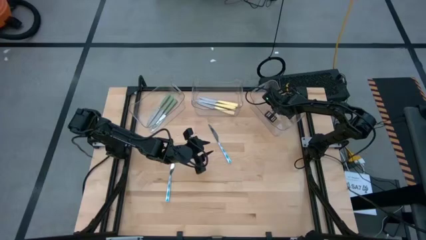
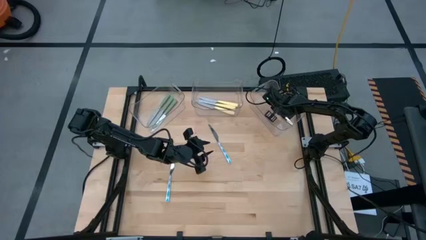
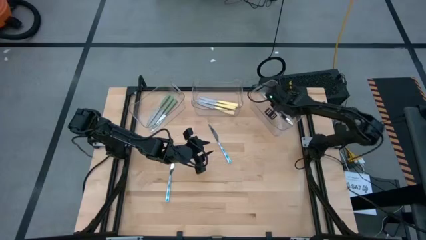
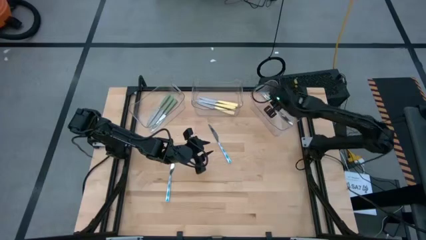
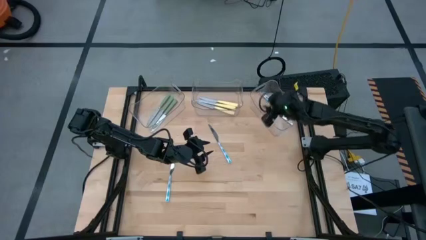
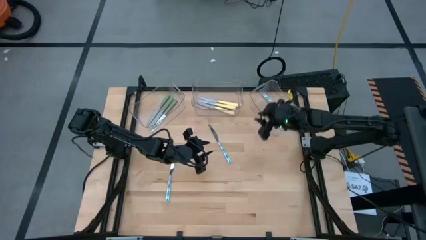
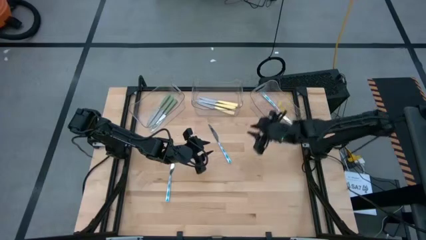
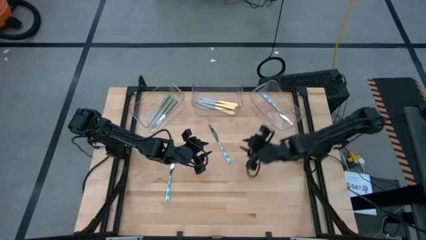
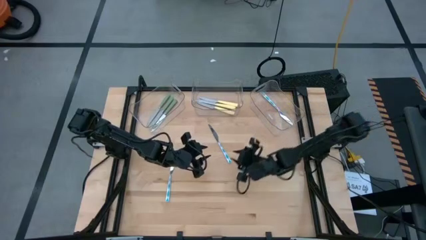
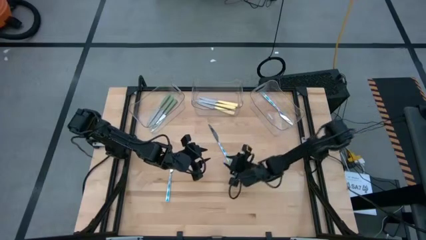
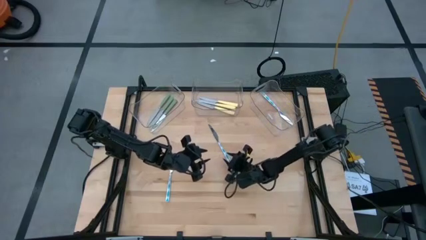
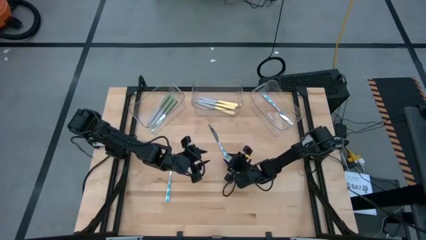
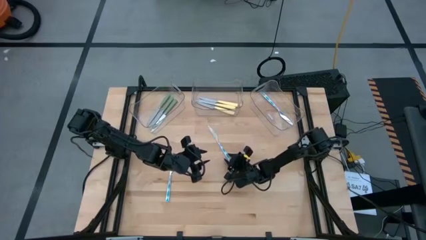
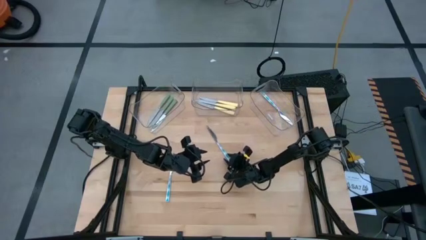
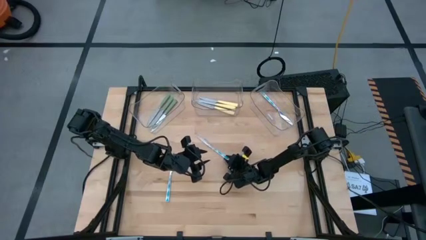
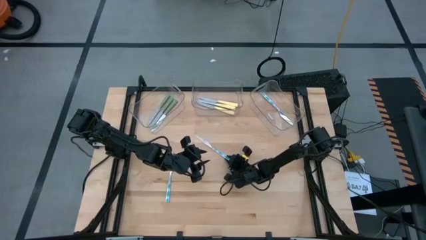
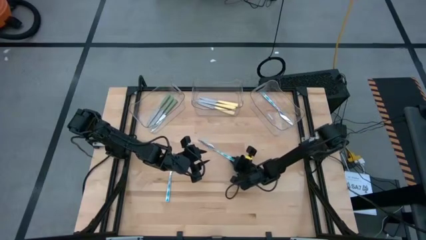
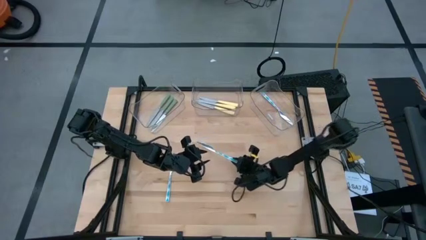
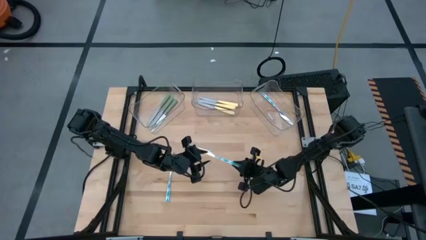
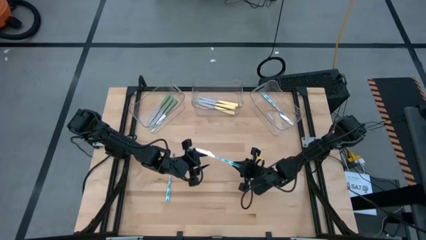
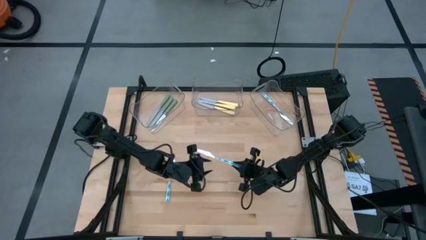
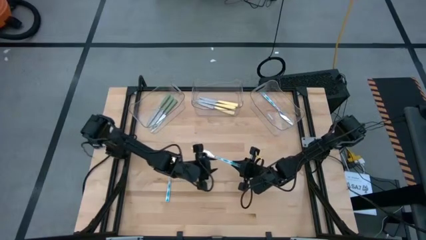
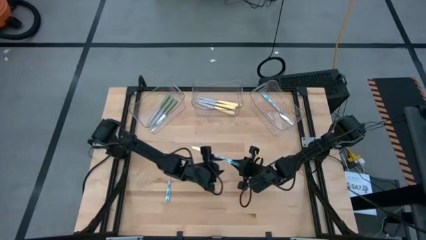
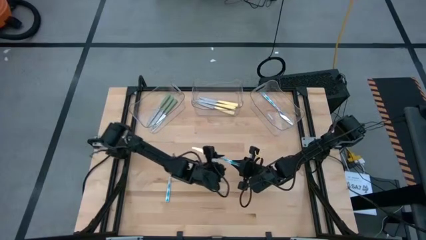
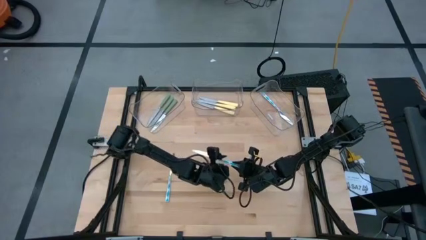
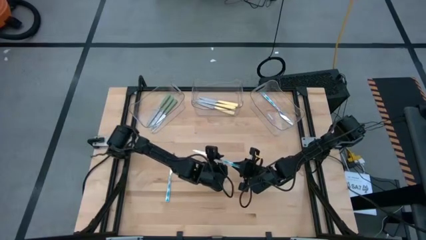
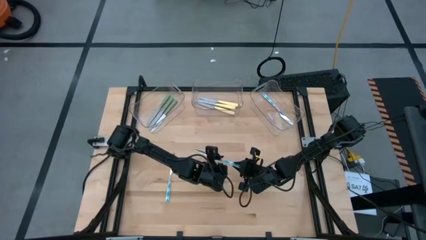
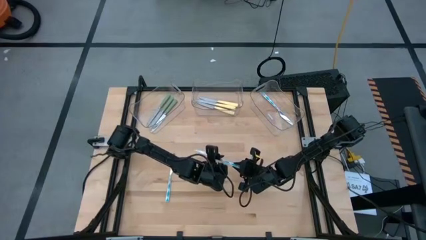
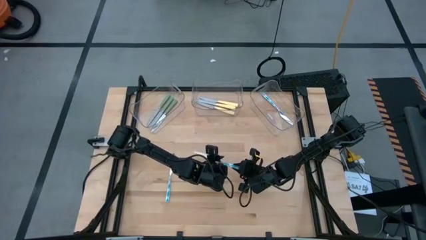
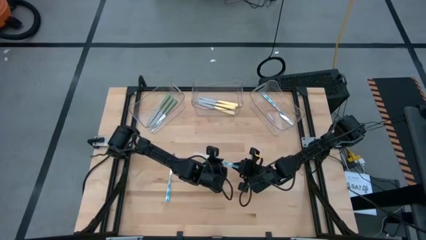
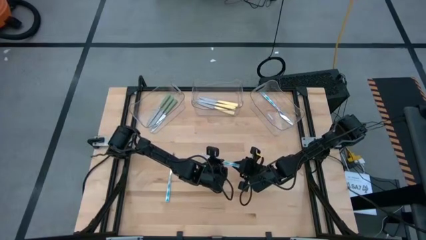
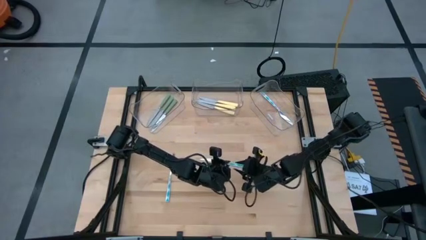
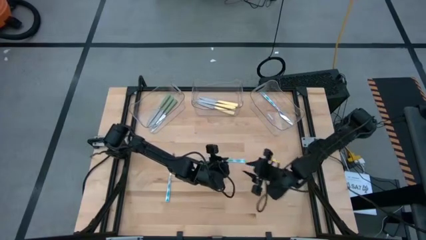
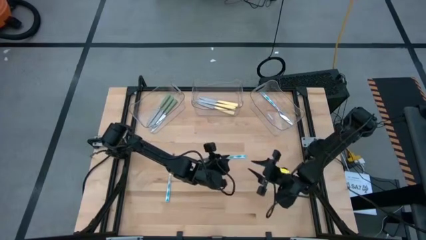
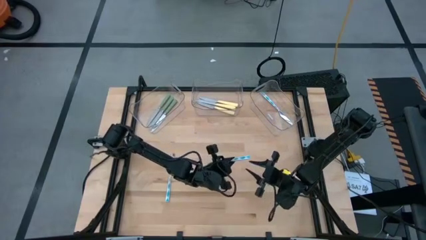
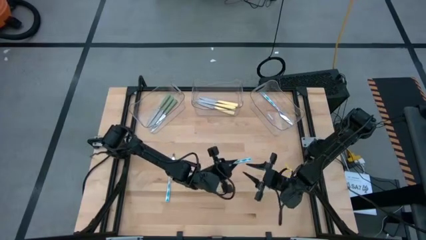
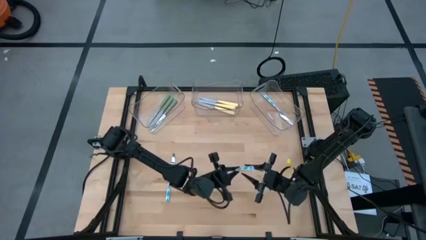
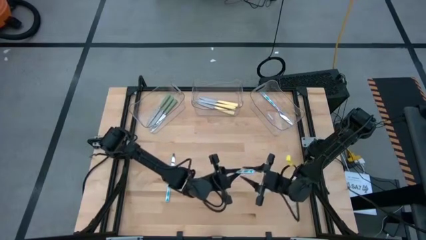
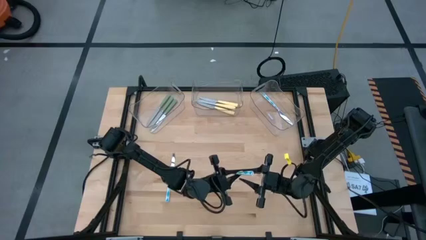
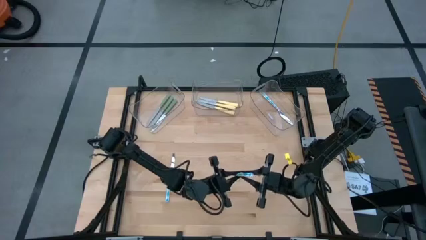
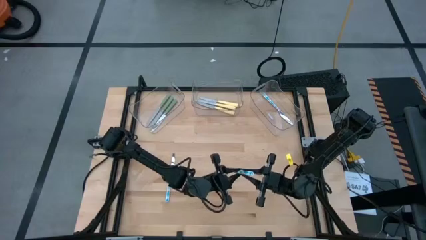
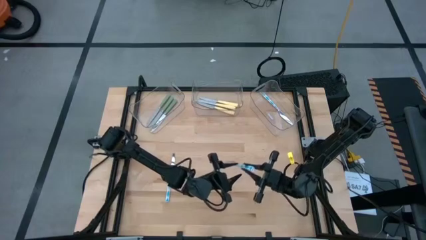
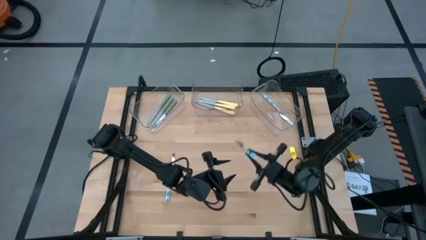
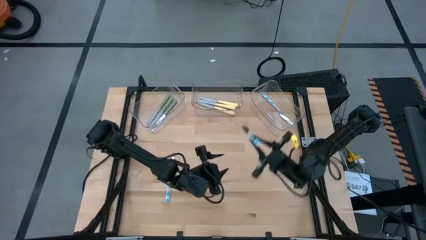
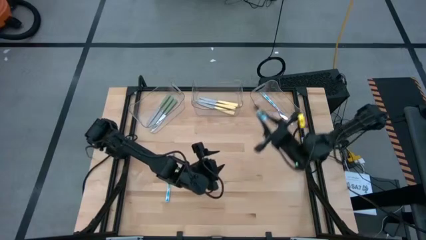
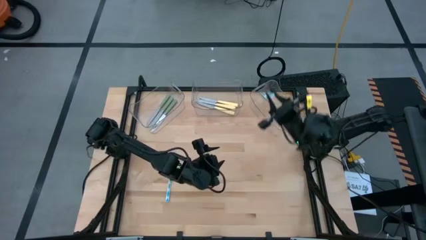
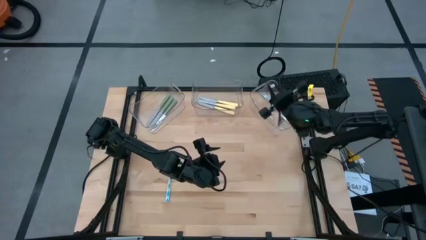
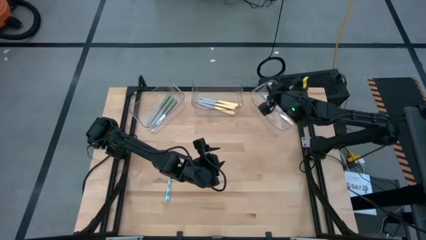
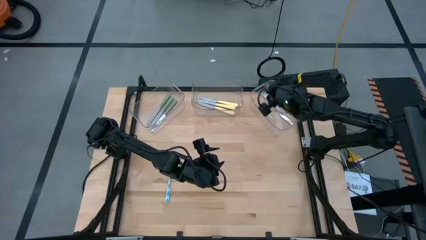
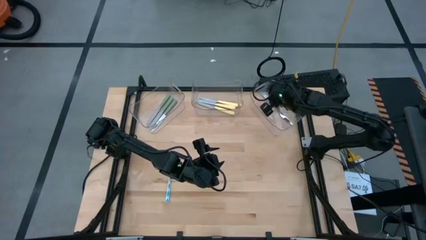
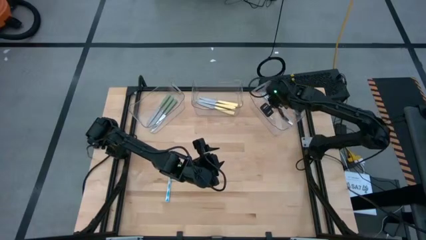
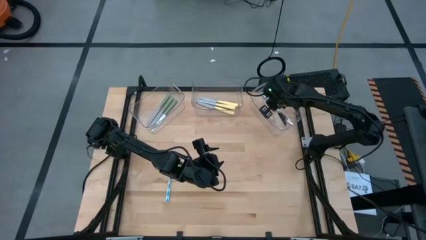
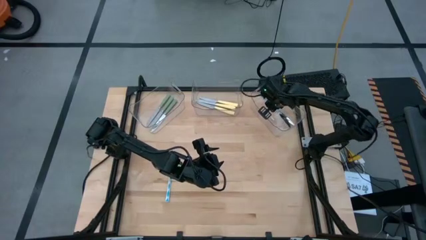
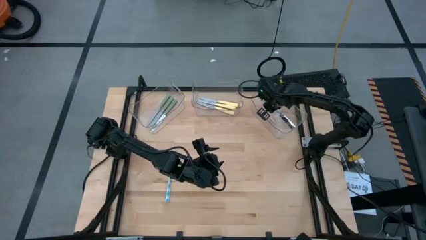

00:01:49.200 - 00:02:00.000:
Task: Sort silverware by color (type)
Put the top blue table knife into the right transparent bin
